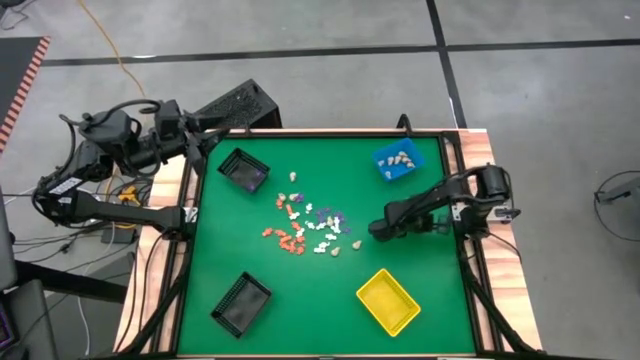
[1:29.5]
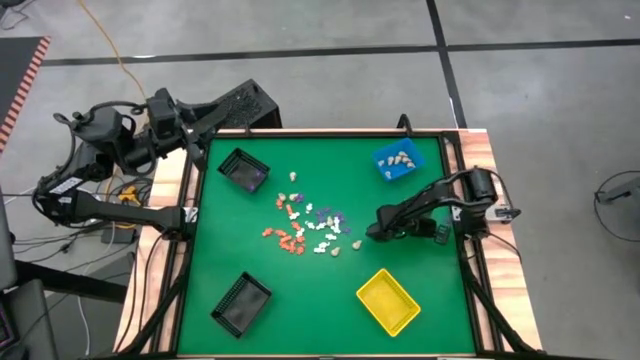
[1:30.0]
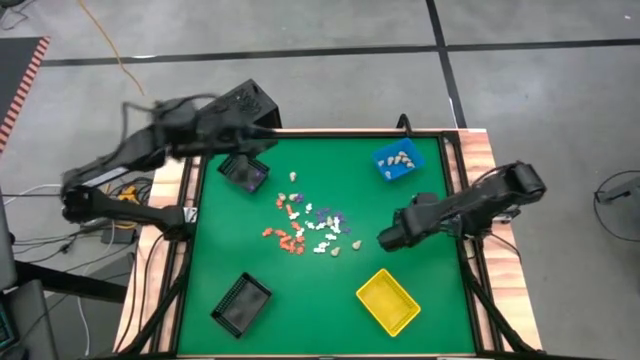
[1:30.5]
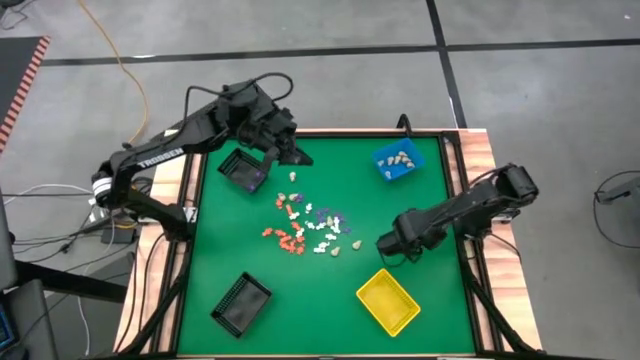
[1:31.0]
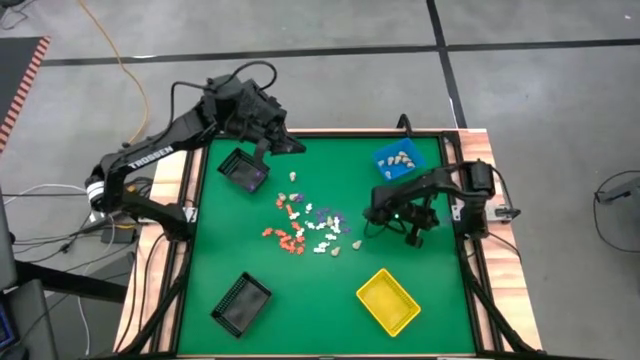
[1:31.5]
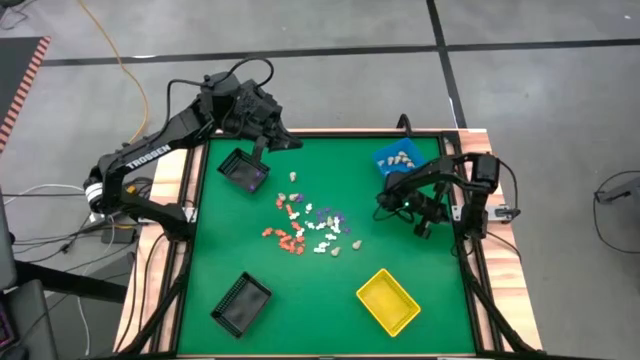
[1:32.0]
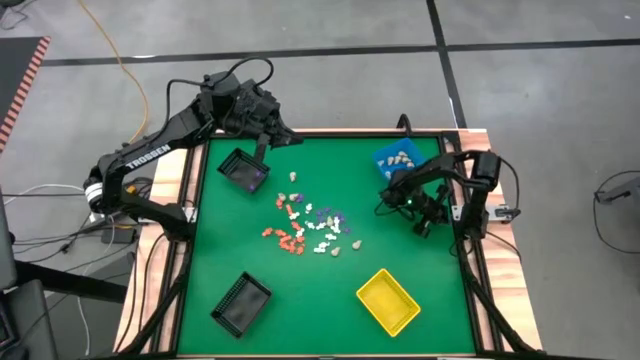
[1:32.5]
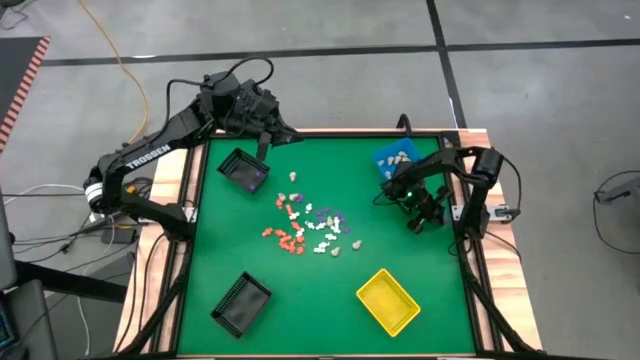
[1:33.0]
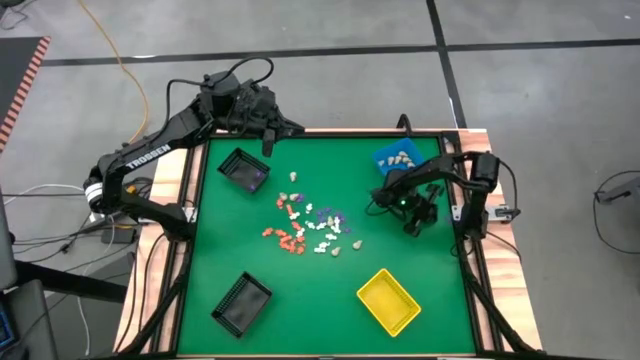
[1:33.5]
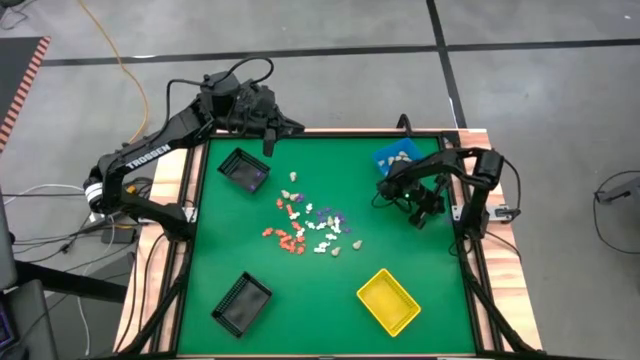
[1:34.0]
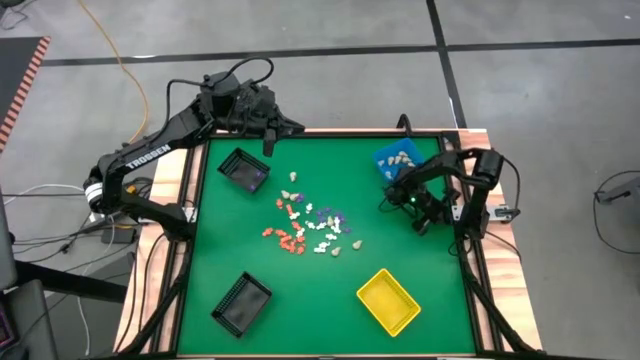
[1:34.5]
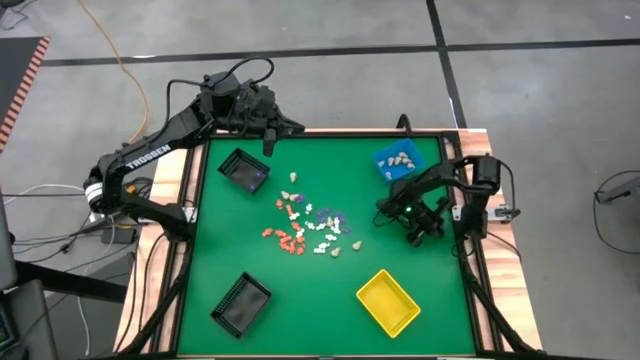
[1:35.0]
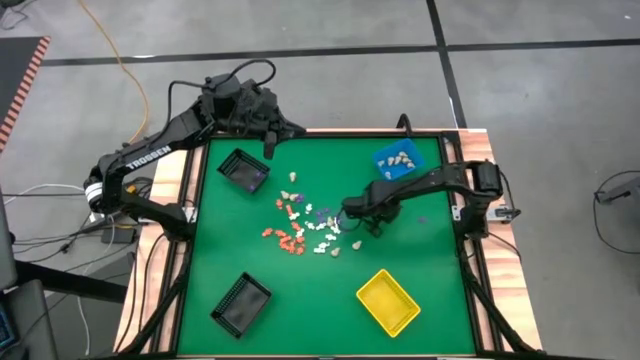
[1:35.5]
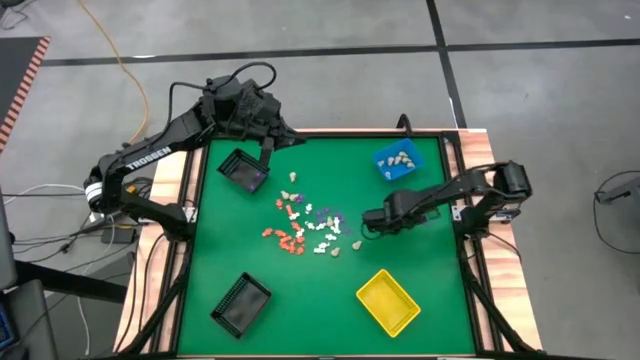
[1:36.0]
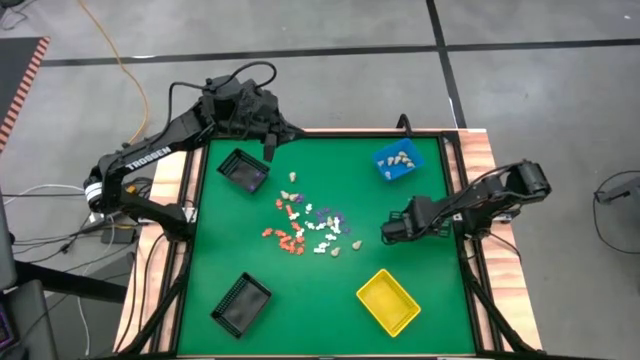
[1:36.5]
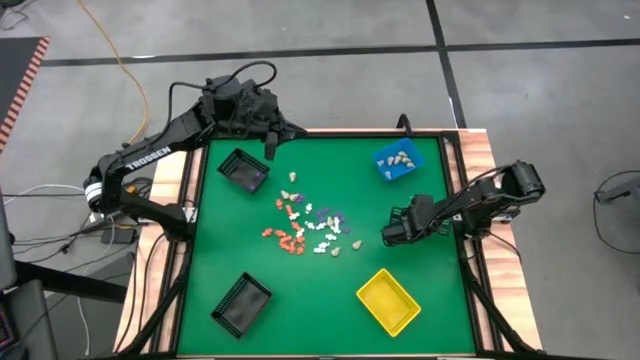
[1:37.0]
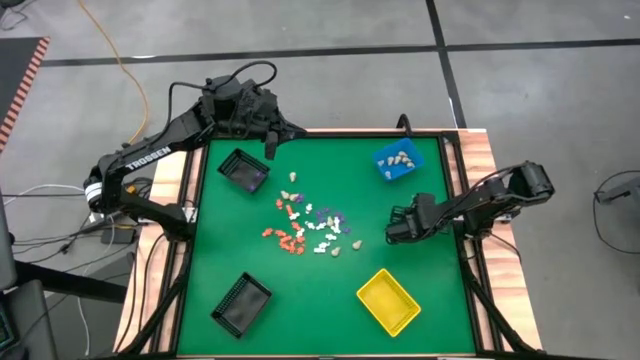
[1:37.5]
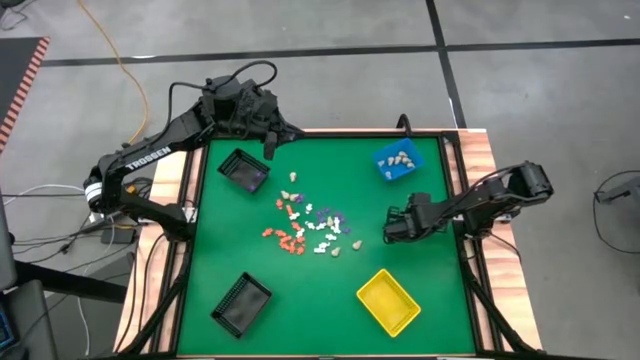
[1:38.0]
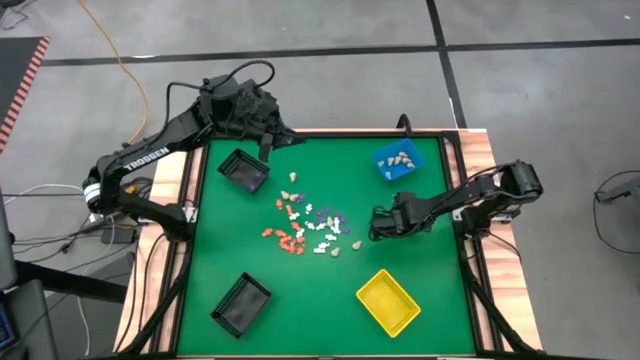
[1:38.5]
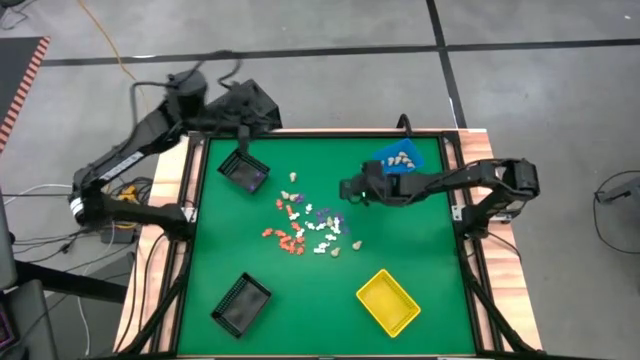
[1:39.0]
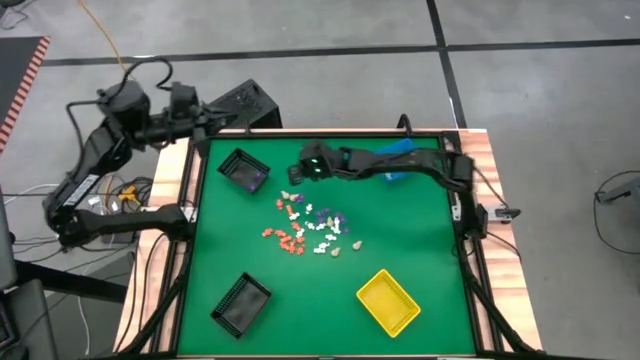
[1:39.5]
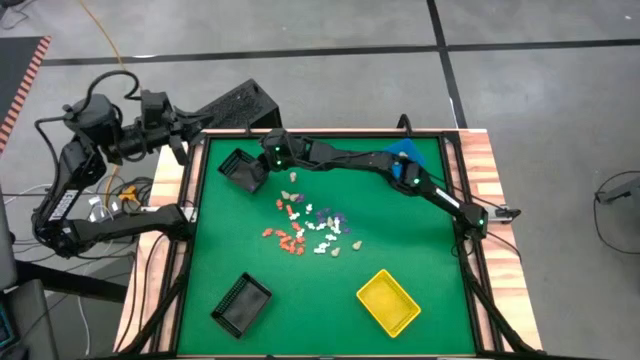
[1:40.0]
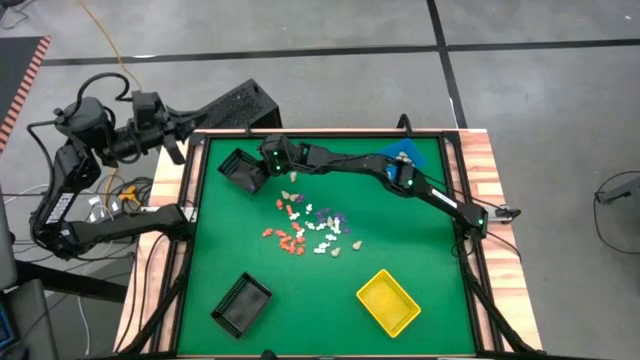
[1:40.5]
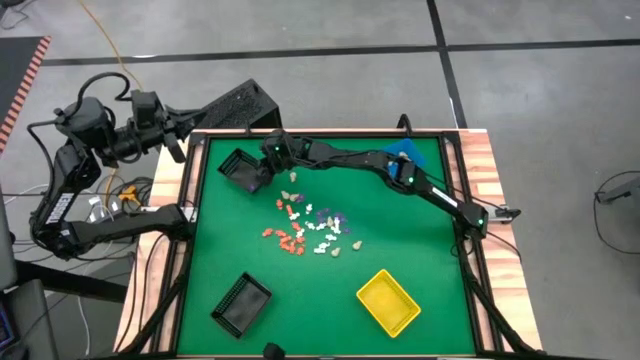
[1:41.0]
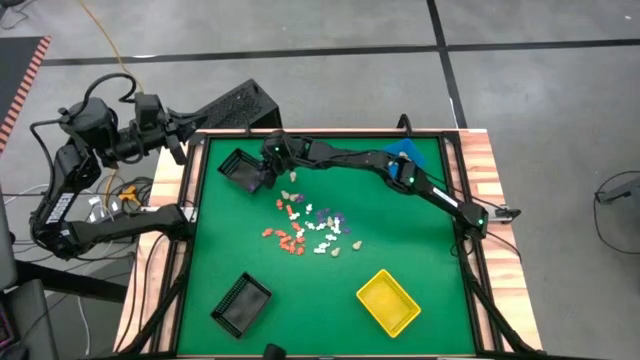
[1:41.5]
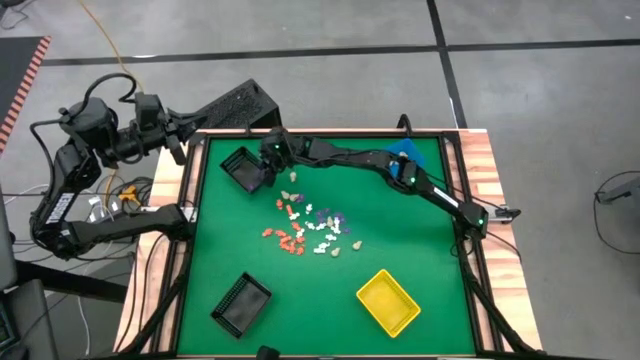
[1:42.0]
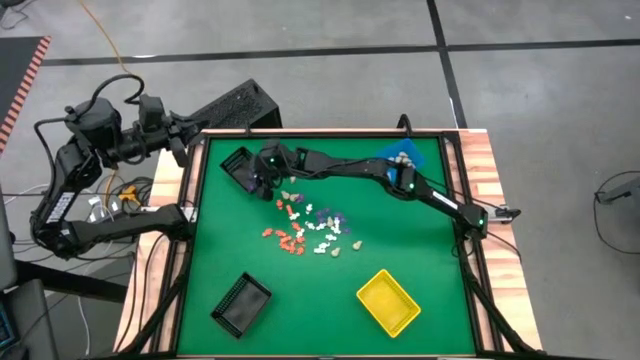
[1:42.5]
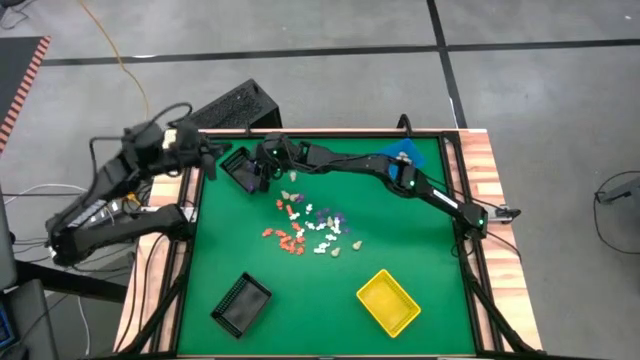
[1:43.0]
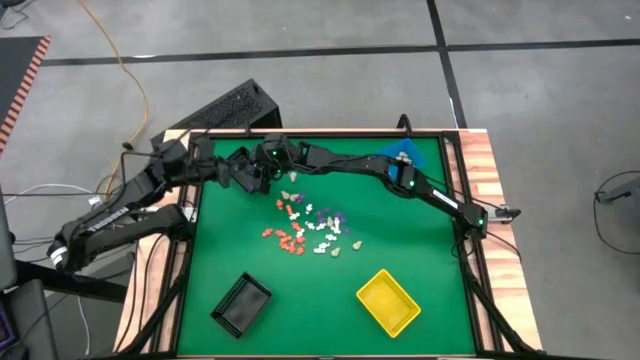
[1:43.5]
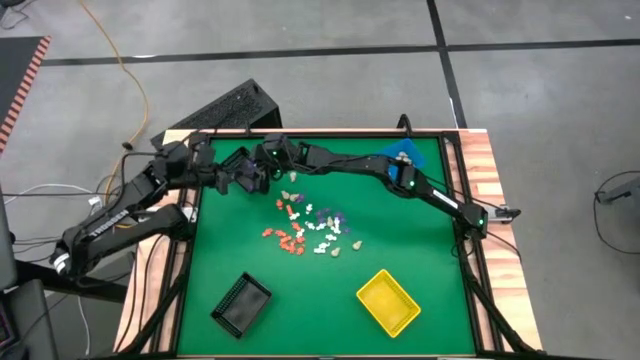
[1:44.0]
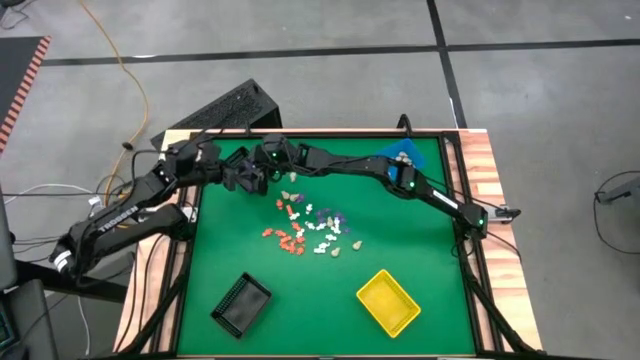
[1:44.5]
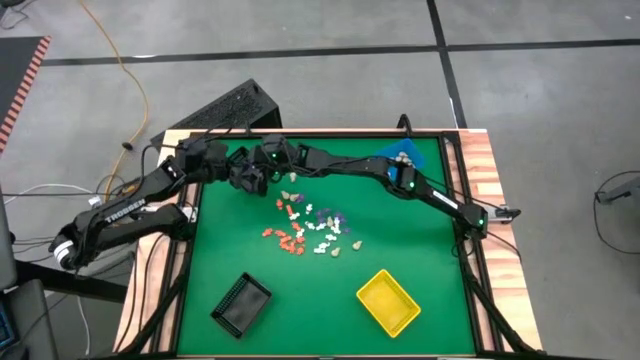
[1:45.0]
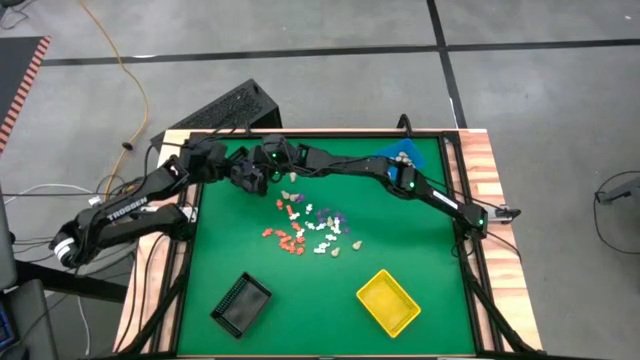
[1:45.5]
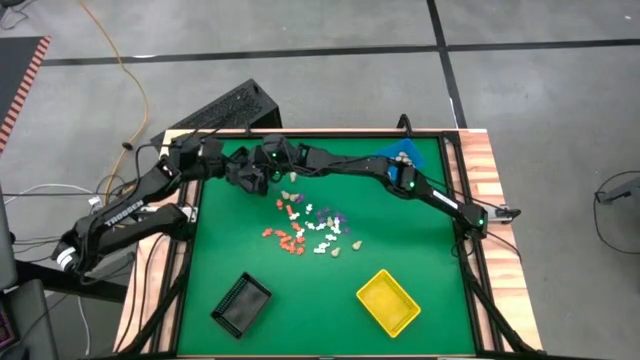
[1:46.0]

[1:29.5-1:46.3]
Task: Sort Halloween decoration
Put the purple spider toy into the top black basket

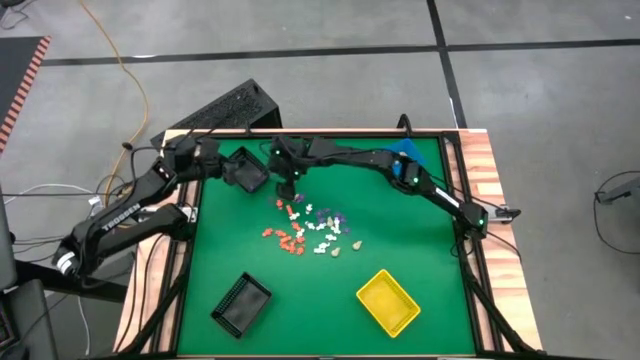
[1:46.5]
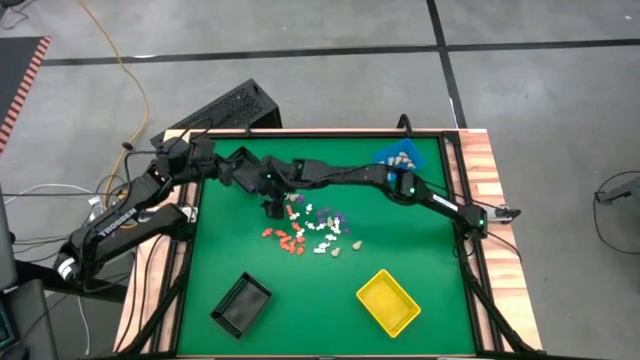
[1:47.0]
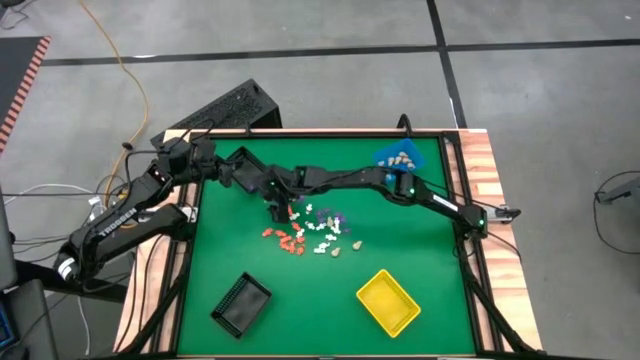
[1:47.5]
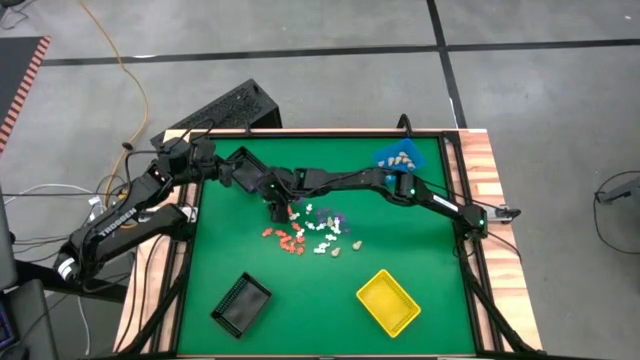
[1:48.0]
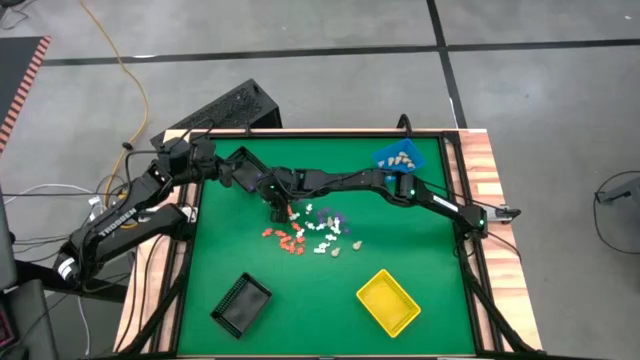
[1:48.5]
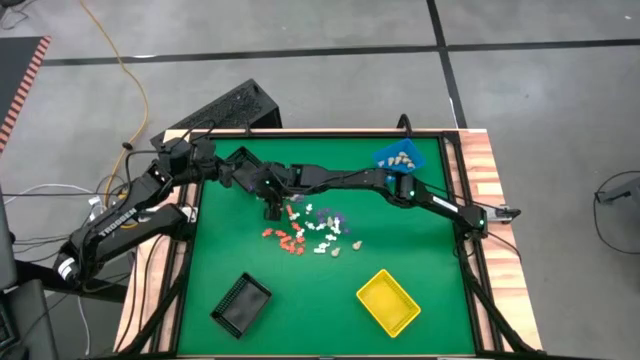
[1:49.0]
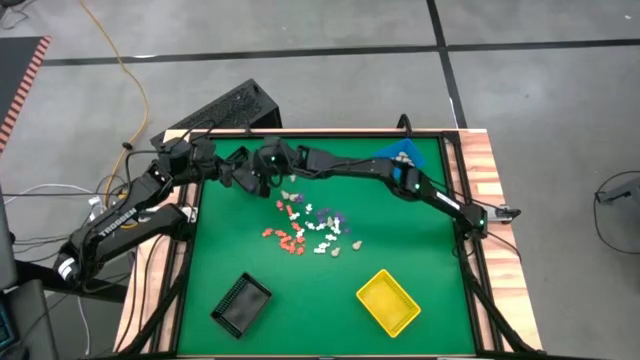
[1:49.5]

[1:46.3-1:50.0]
Put the purple spider toy into the top black basket

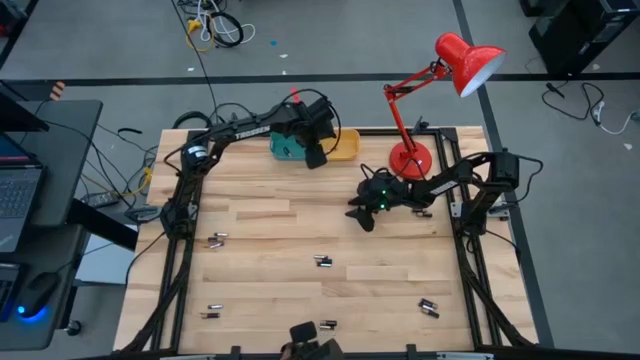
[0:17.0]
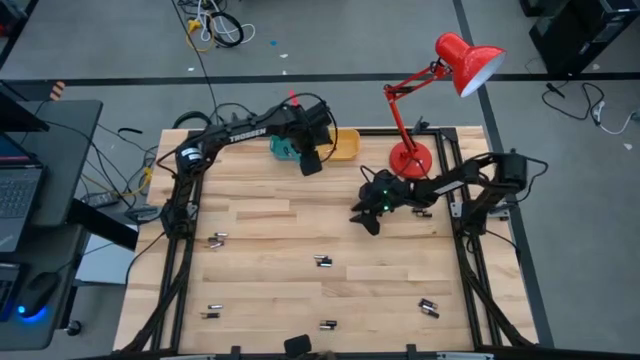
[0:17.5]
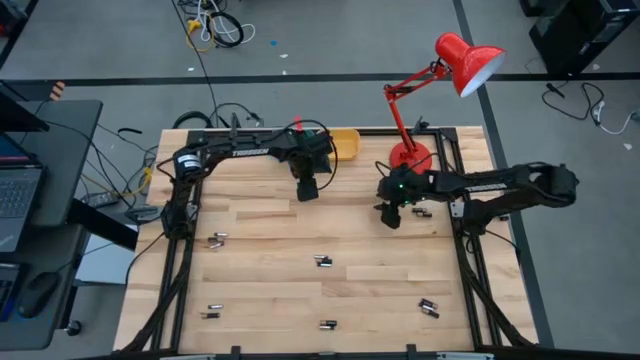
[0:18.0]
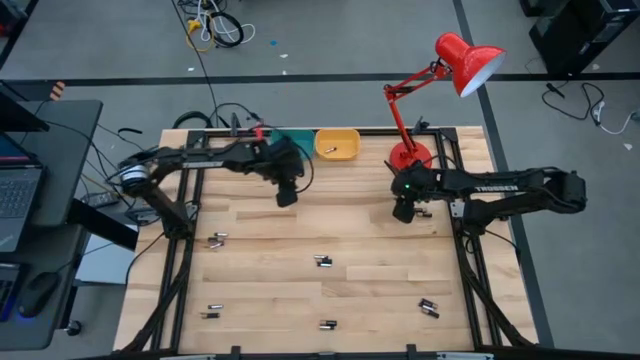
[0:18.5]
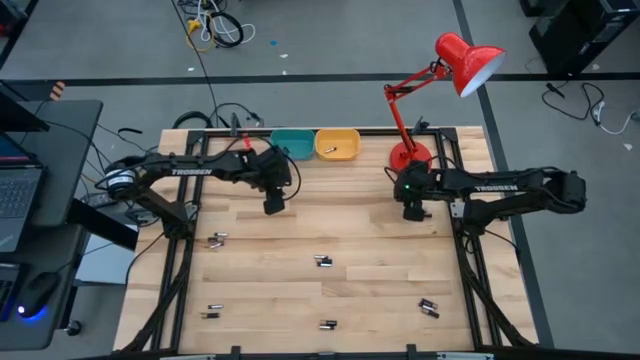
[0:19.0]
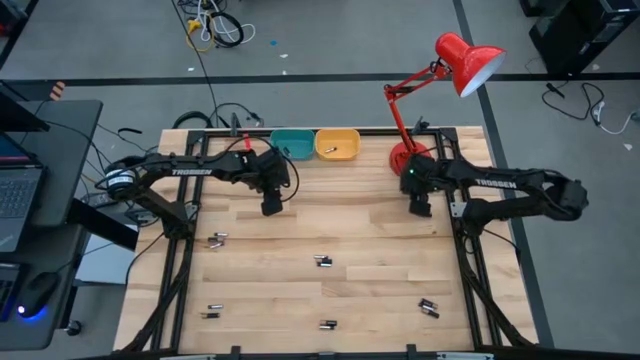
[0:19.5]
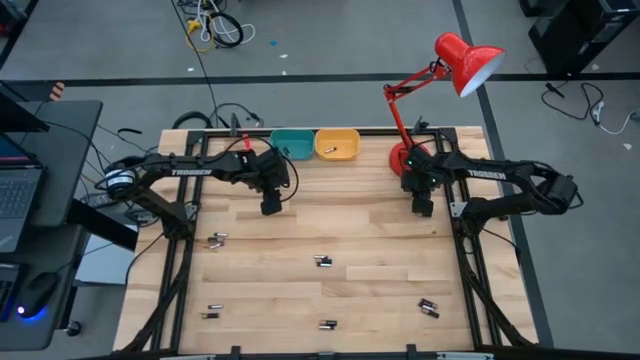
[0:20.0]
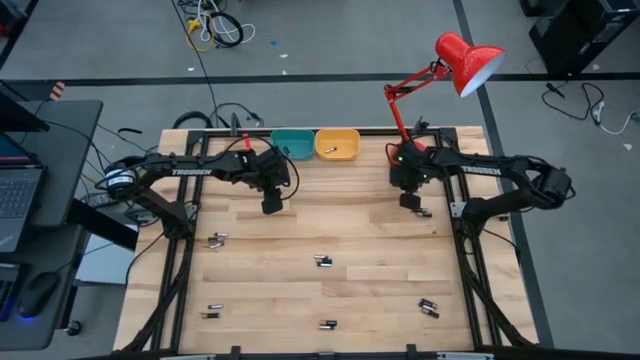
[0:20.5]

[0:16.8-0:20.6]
Task: Sort batteries
Put the white battery into the yellow bin
